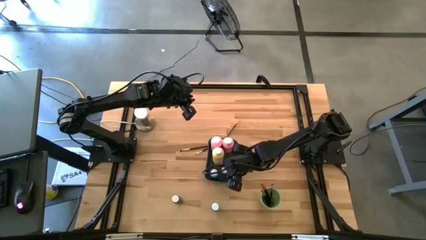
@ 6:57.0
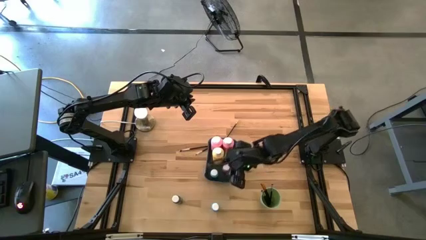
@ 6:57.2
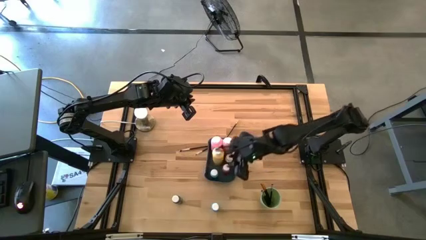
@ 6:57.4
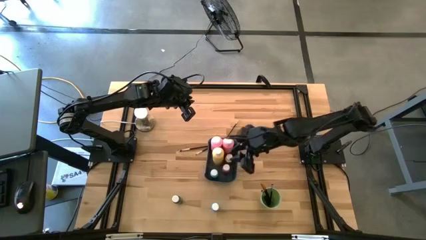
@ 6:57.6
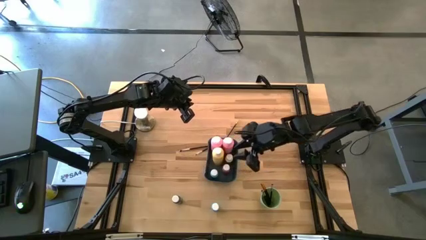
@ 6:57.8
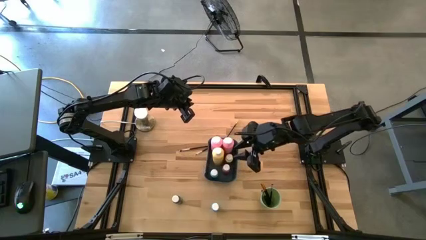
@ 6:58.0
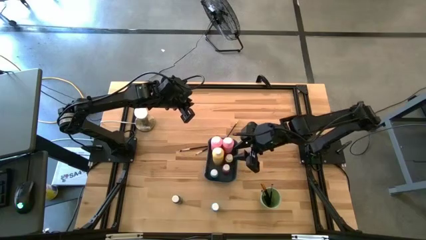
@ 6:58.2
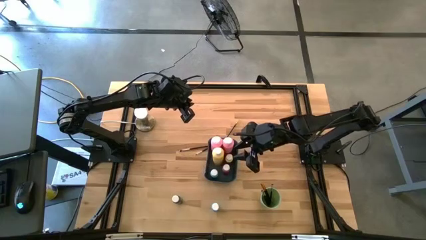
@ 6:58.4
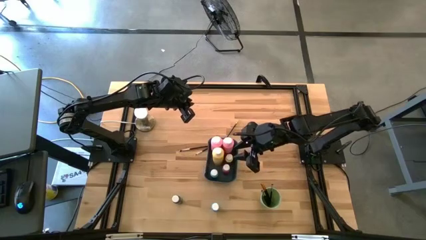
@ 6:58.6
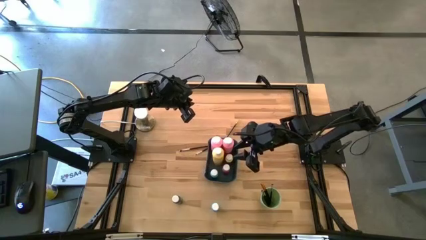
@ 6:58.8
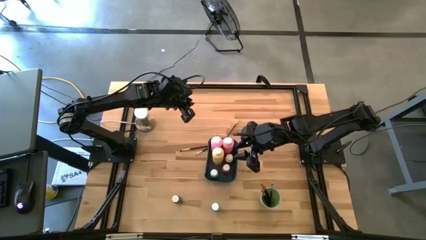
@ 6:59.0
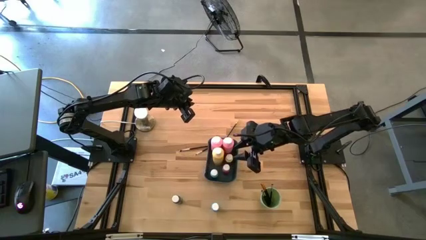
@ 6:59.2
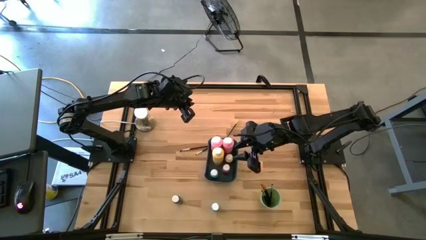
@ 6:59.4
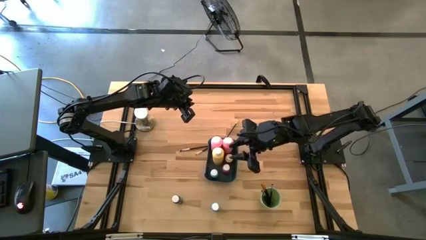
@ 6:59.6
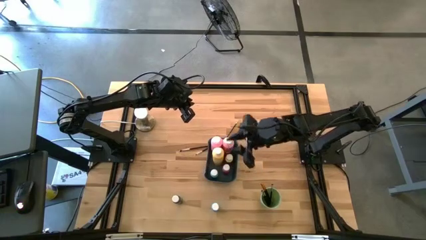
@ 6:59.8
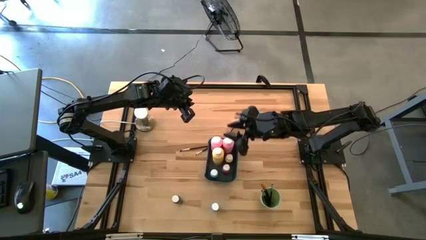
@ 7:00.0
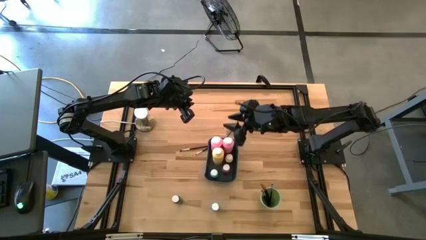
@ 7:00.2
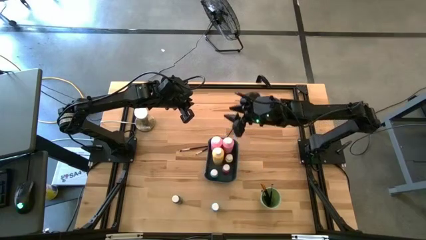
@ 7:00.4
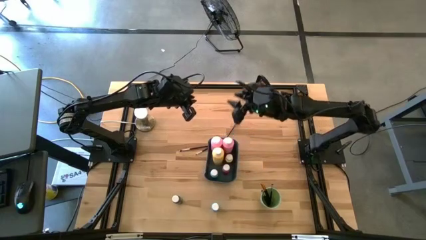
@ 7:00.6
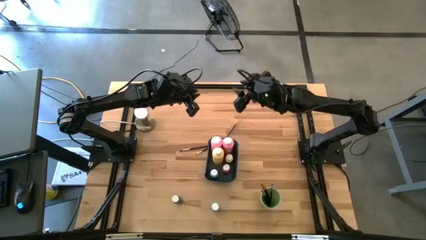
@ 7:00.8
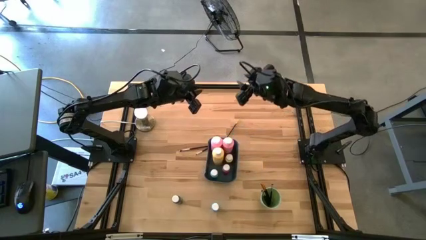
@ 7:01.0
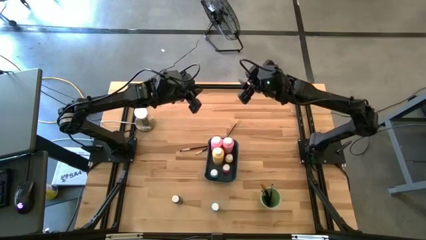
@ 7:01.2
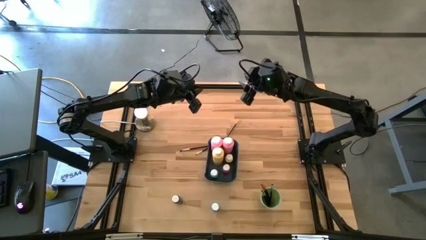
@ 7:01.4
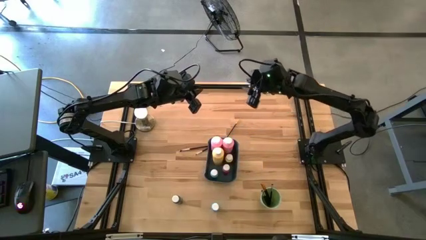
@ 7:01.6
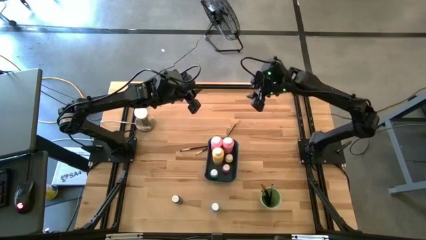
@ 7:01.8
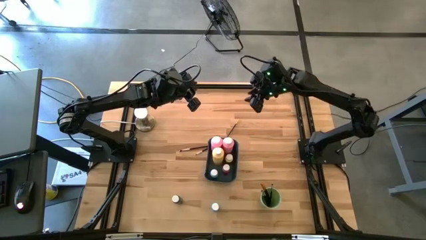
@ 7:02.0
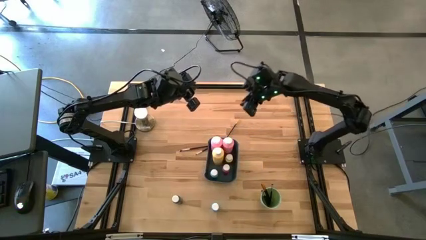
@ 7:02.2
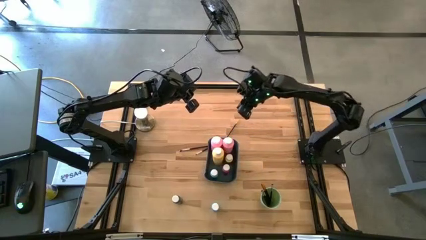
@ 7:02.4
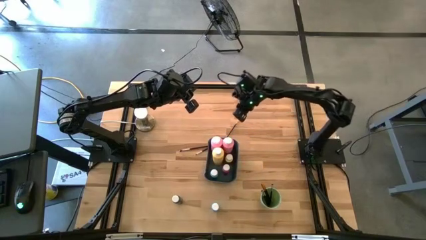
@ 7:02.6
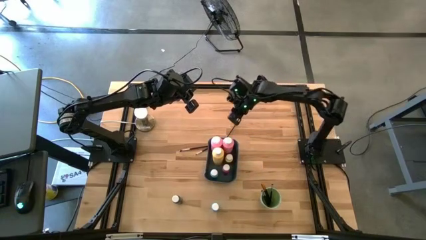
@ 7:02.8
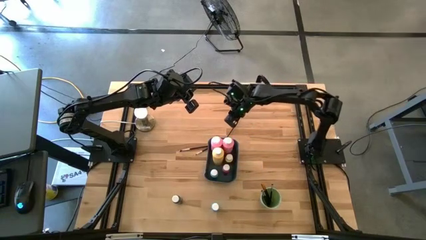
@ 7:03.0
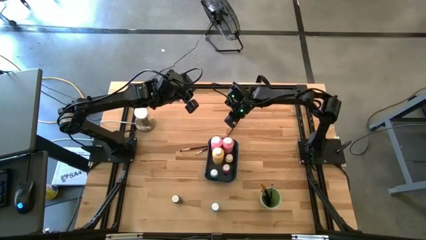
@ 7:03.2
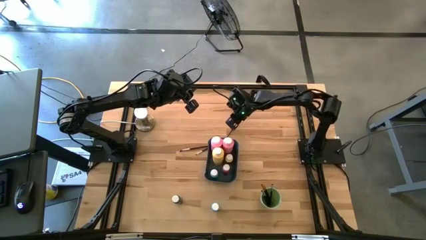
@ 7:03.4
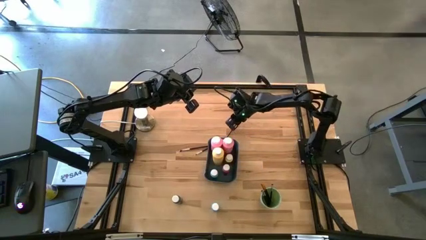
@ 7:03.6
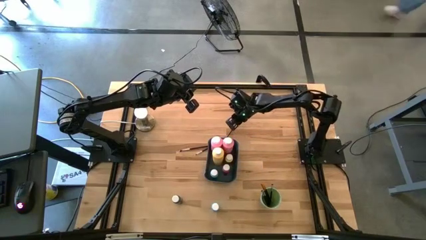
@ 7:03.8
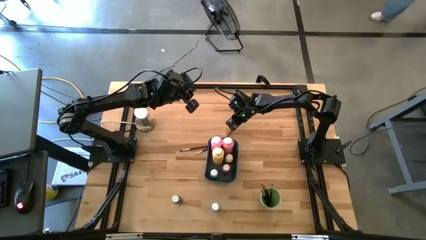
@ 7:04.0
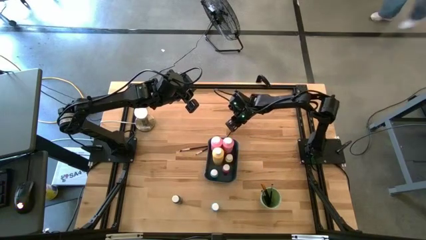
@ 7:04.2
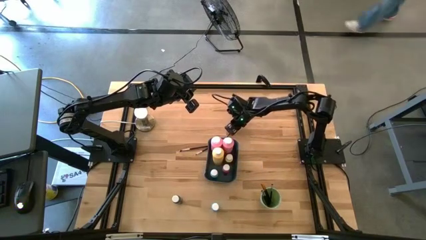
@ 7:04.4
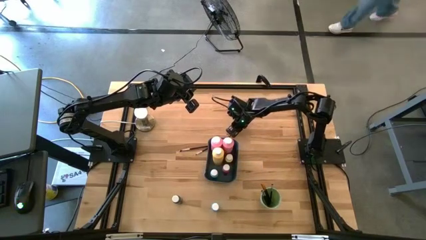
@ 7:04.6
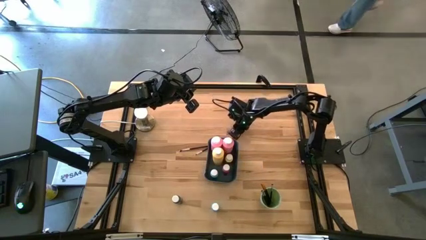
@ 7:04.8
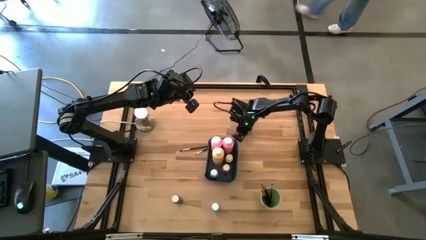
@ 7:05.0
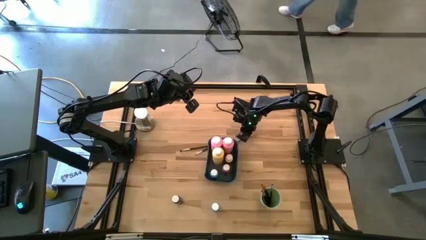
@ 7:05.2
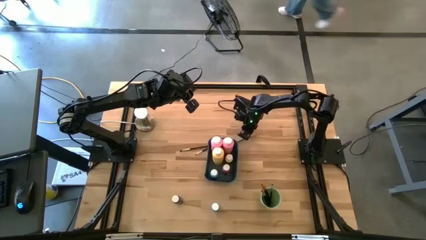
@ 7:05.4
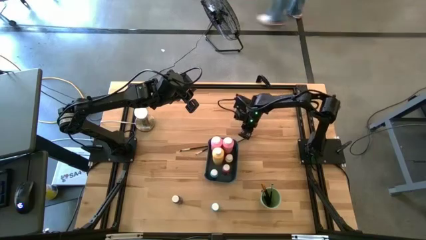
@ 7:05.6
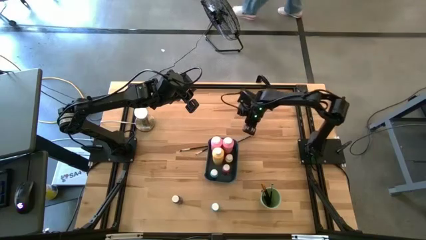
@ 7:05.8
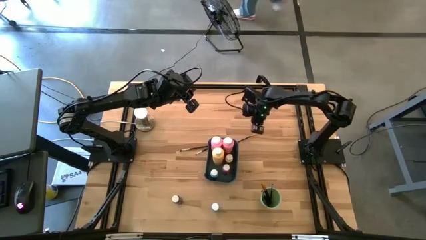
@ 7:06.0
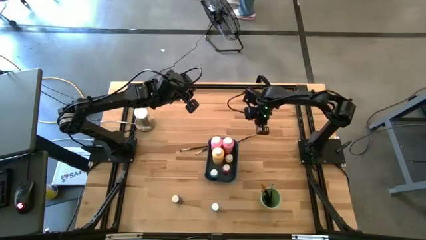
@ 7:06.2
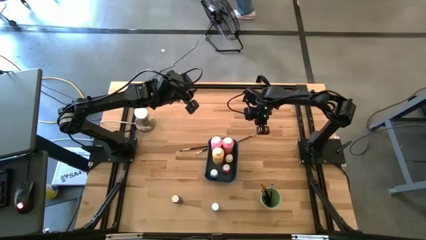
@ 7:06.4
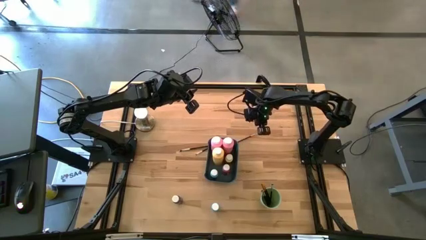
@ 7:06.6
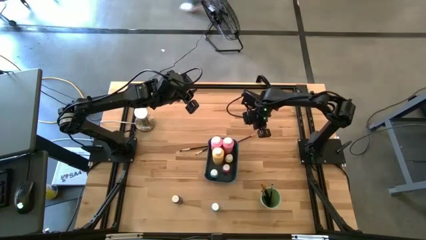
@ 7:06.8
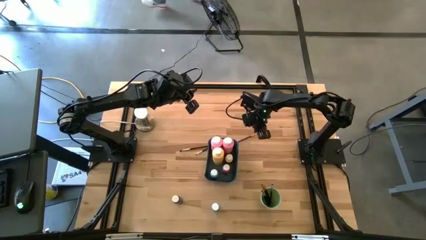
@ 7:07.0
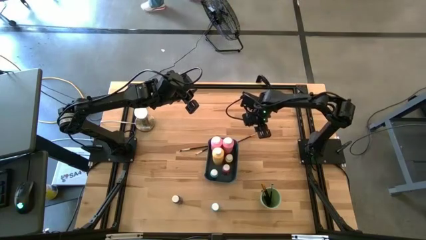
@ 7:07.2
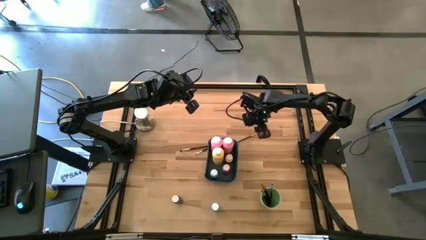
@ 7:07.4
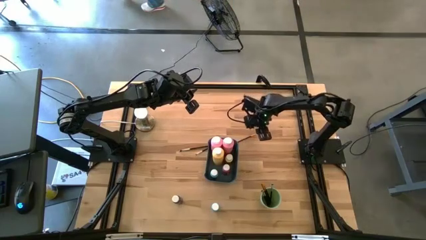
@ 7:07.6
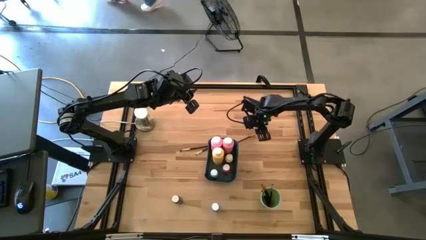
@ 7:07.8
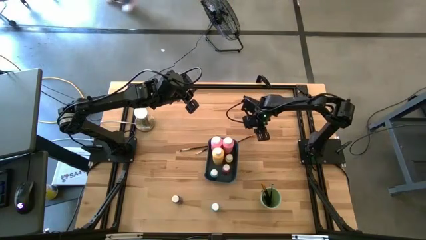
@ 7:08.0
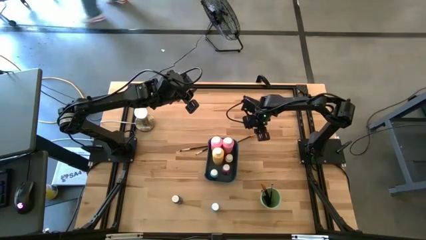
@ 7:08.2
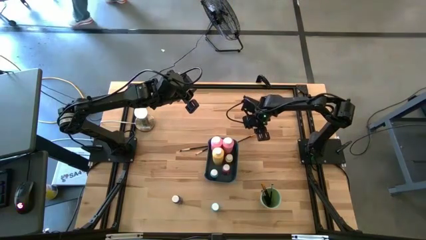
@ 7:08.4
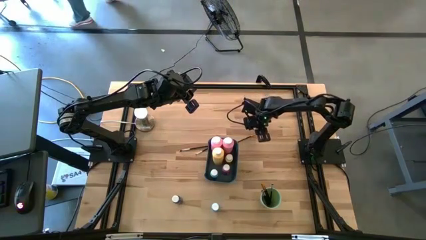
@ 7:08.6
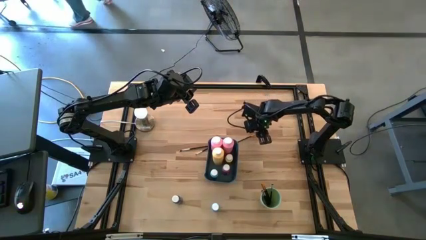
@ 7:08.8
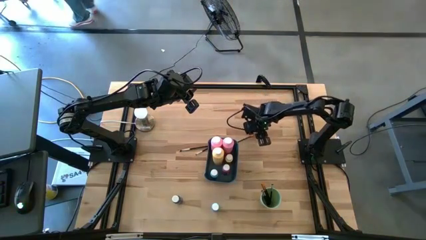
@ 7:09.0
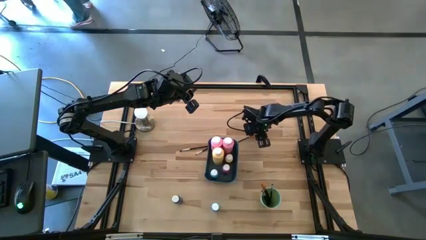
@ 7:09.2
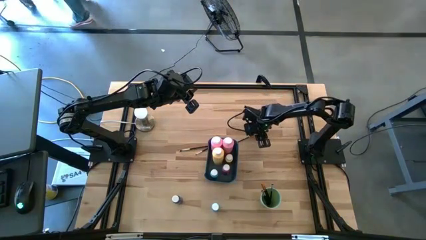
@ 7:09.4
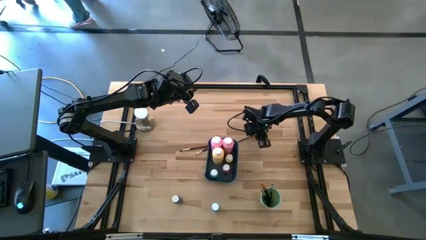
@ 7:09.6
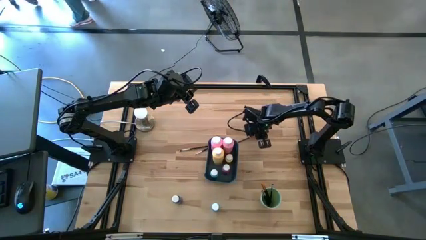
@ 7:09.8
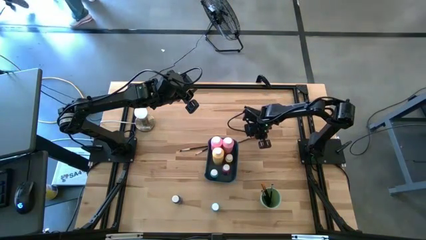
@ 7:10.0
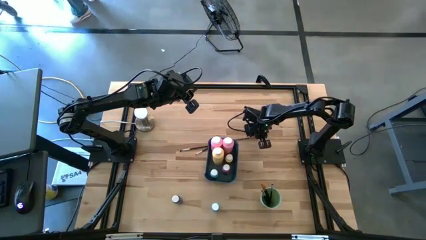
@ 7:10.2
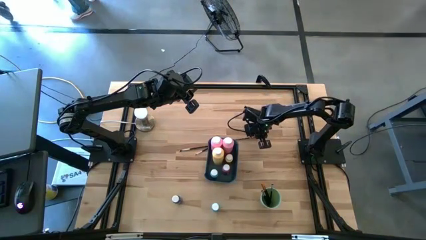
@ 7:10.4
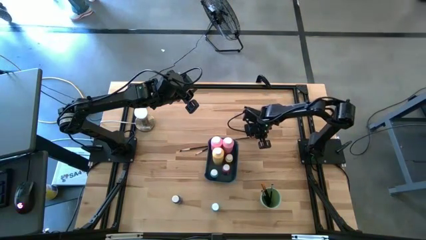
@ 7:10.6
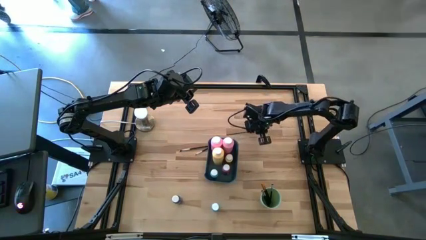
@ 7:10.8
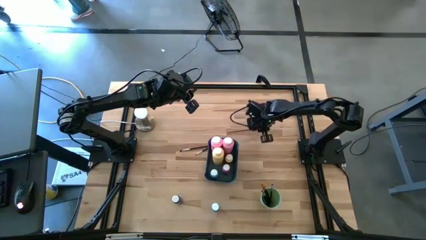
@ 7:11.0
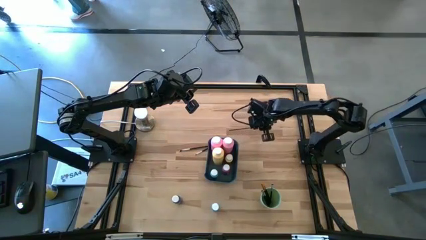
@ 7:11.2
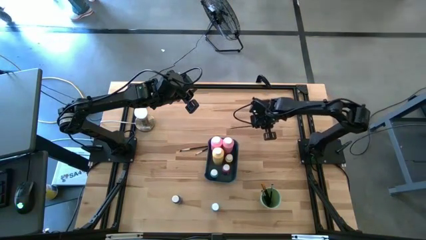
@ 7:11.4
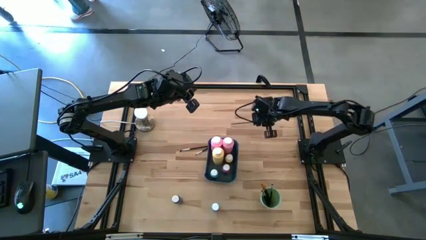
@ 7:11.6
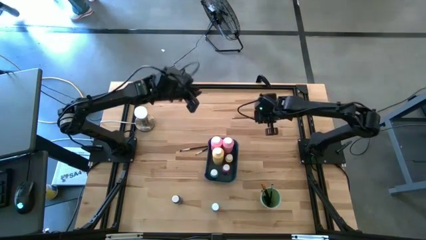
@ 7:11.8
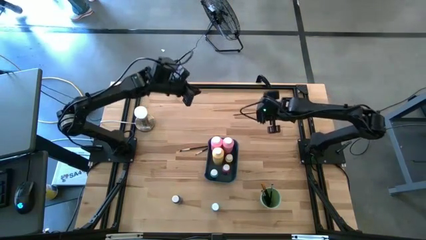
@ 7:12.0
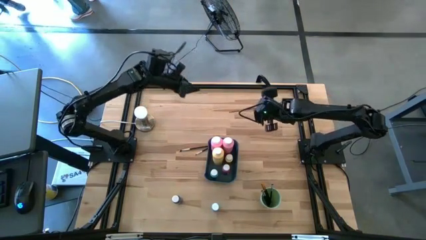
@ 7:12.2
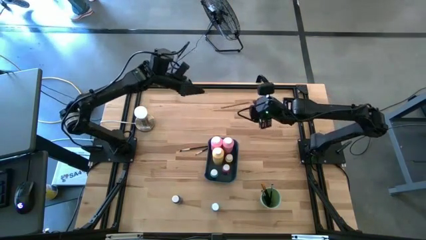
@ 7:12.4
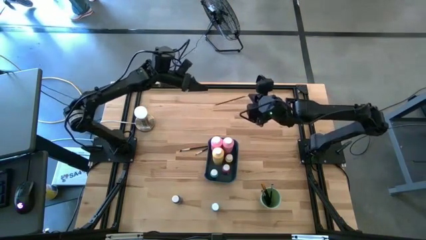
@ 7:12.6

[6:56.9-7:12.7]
Task: Pick & Place Paint Supplies
Put the black and gold paint brush into the green cup
